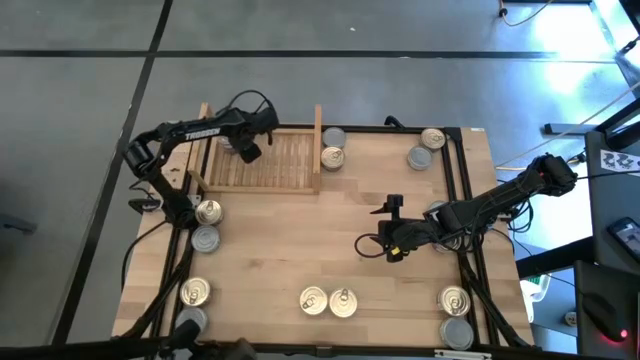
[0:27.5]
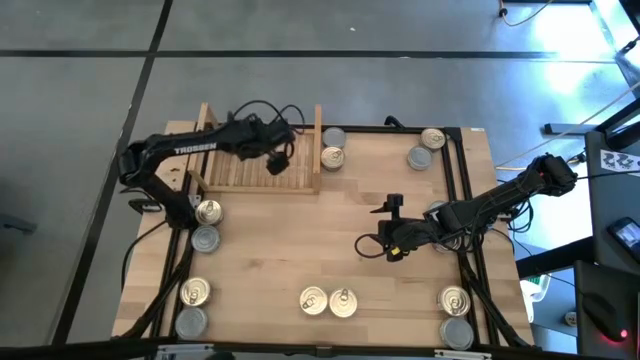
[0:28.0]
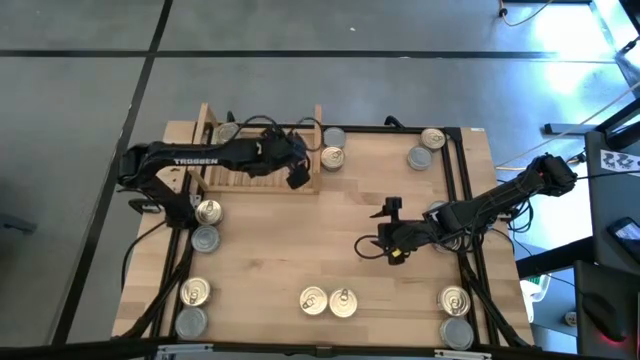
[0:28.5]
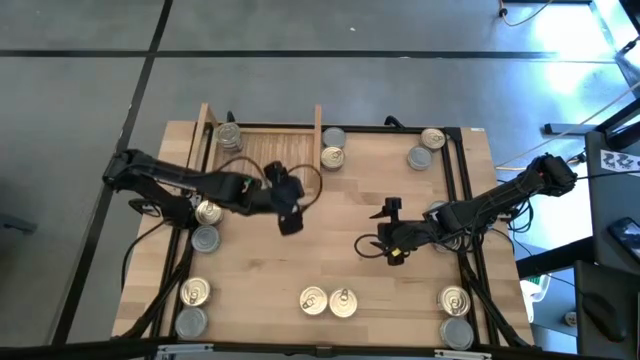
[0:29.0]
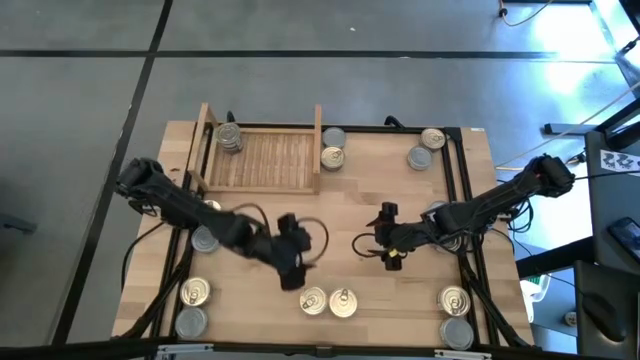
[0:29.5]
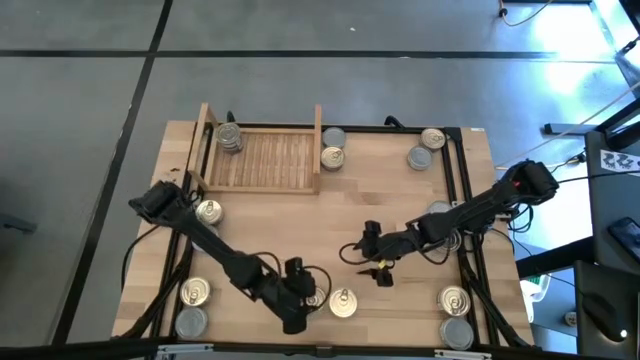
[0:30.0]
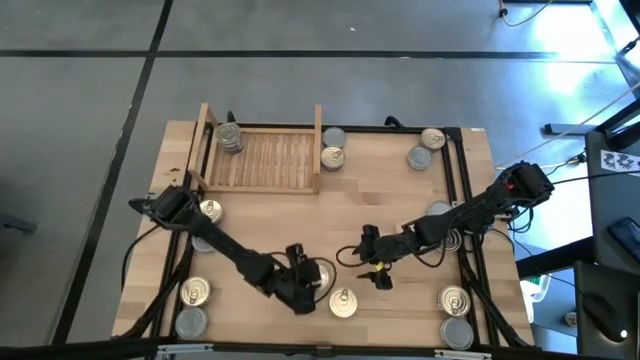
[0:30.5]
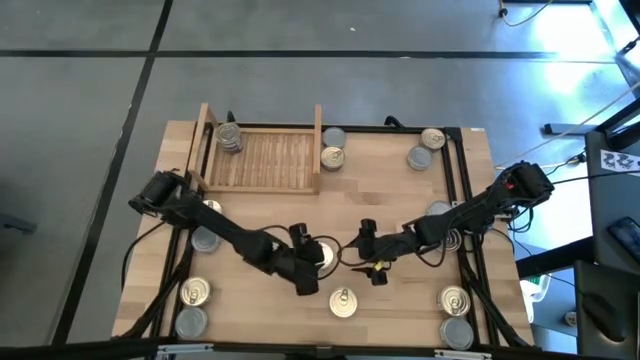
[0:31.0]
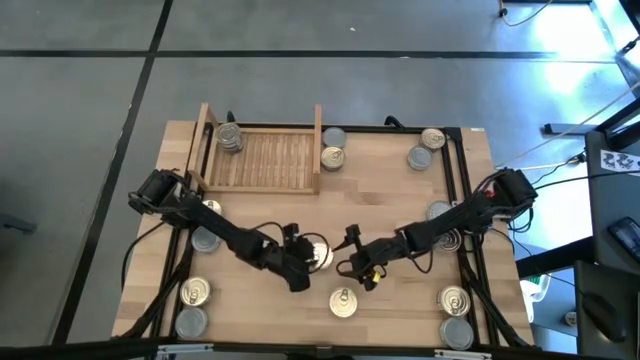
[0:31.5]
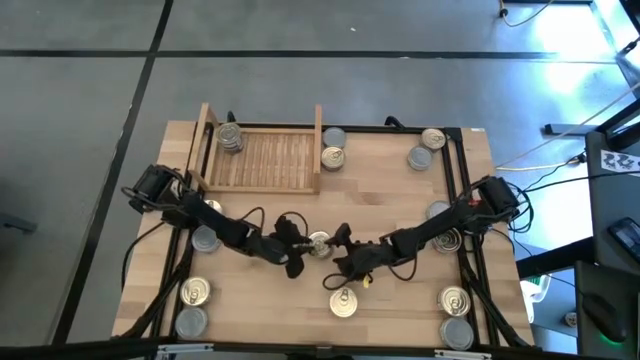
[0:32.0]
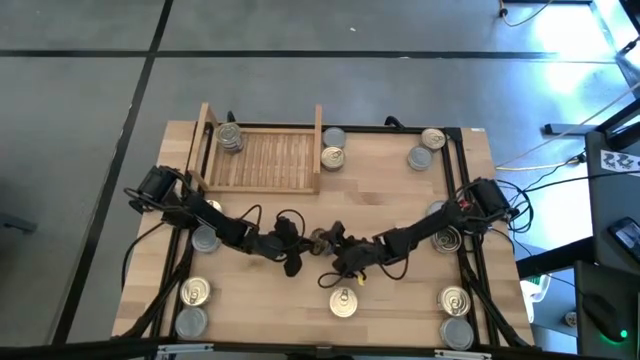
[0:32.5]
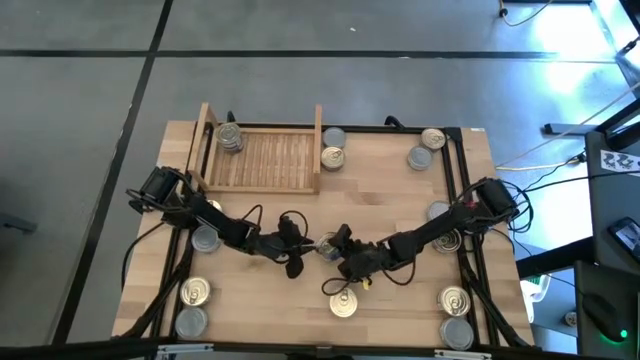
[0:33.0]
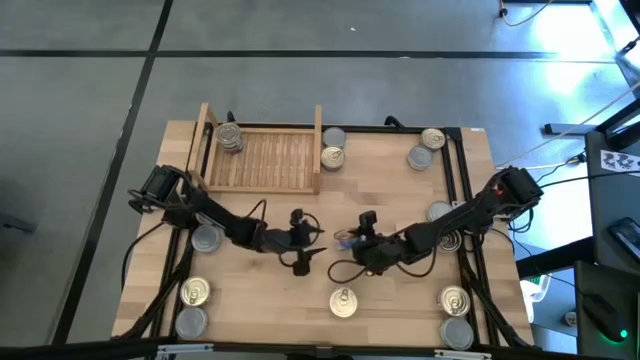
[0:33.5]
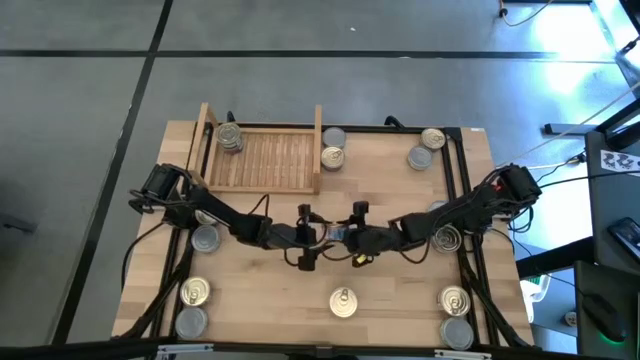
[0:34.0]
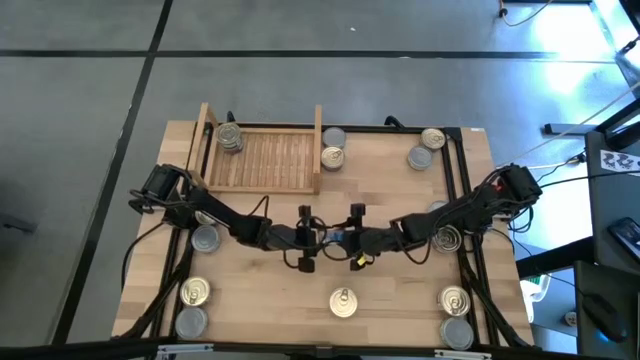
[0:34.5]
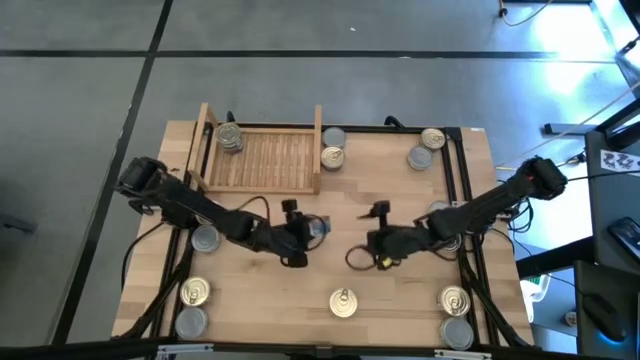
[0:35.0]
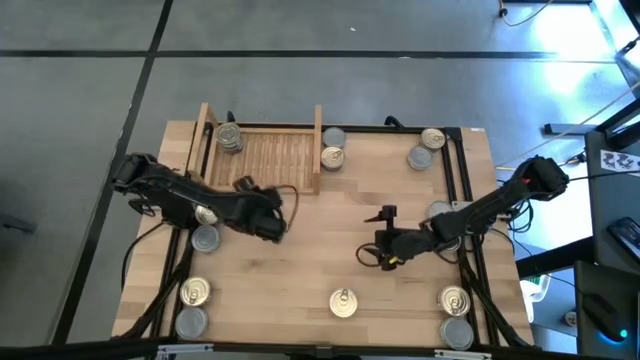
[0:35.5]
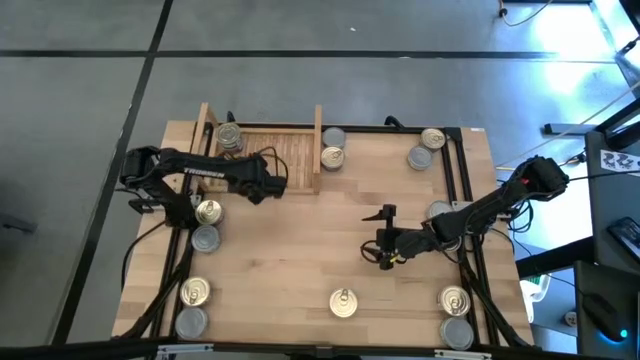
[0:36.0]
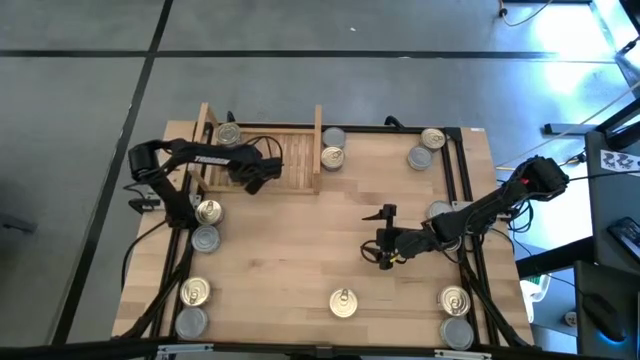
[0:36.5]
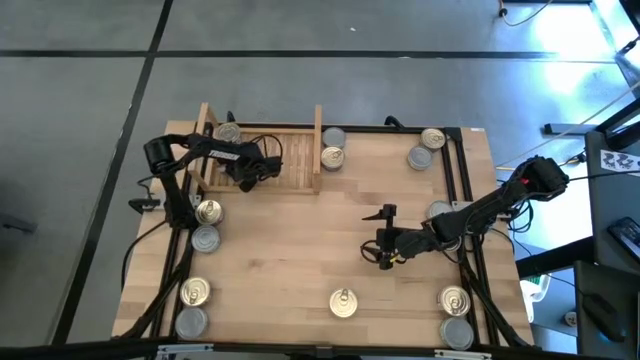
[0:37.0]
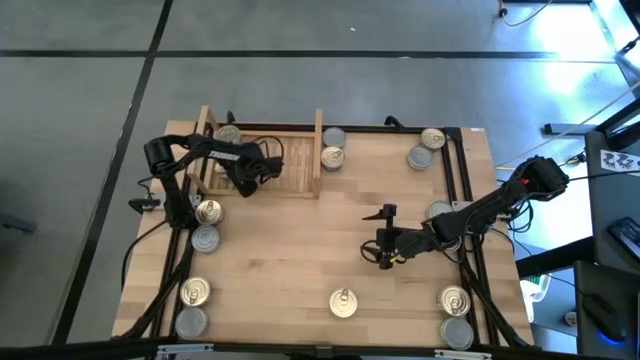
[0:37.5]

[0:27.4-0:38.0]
Task: Stack canned seafood by type on shelf
Put the blue tuna can on the shelf

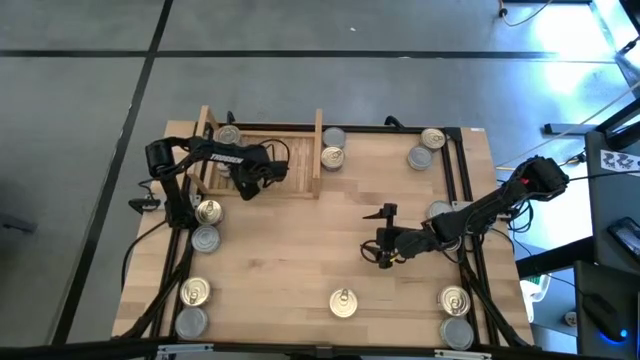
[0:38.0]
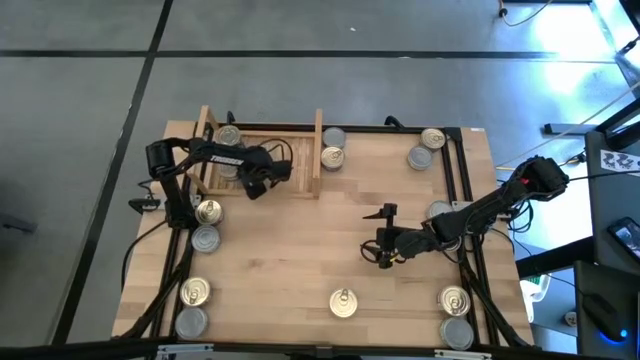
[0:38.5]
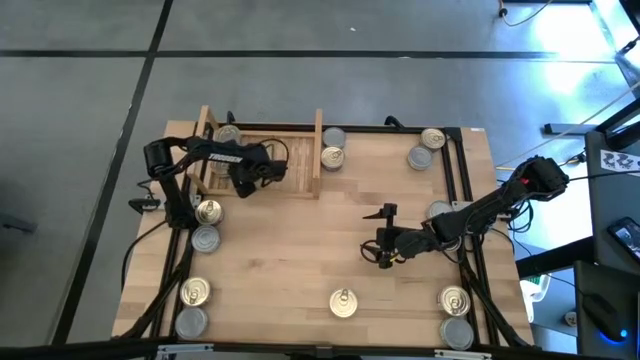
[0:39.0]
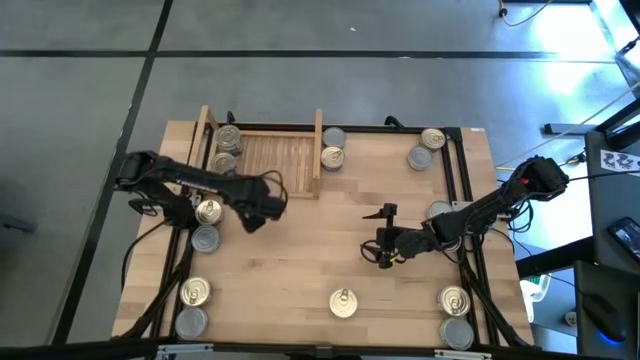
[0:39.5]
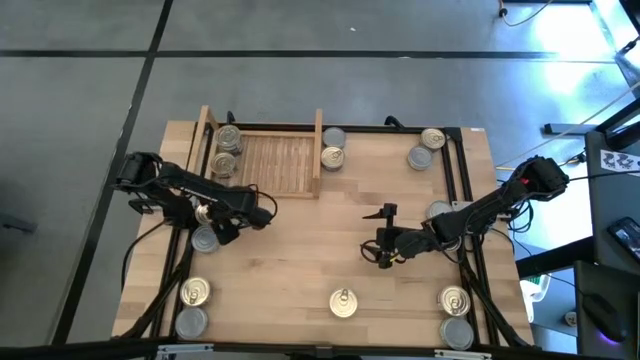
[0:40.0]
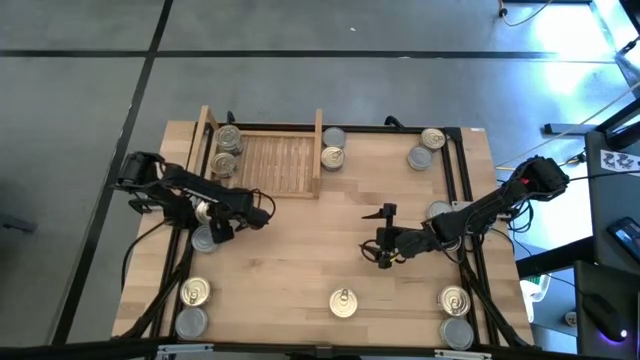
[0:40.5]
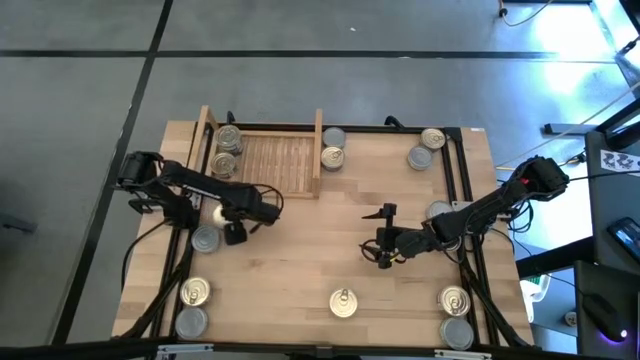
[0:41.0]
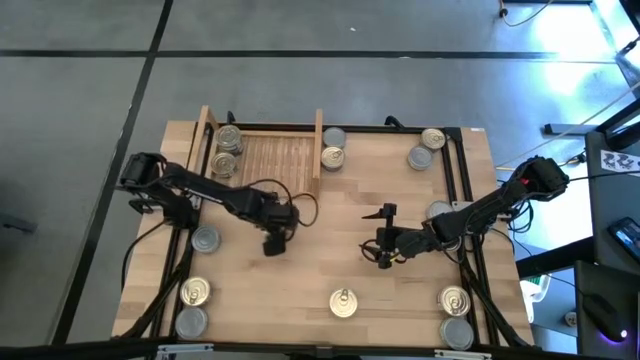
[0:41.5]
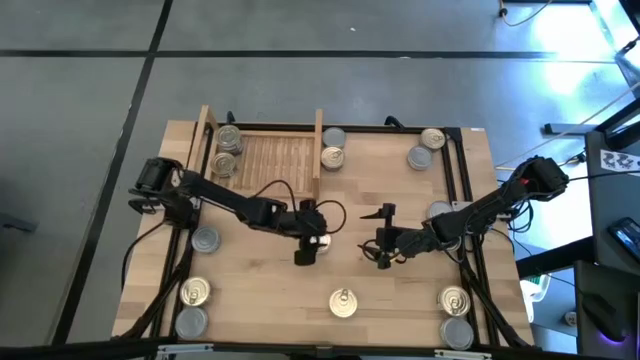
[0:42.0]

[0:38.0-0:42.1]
Move the blue tuna can from the middle left to the center

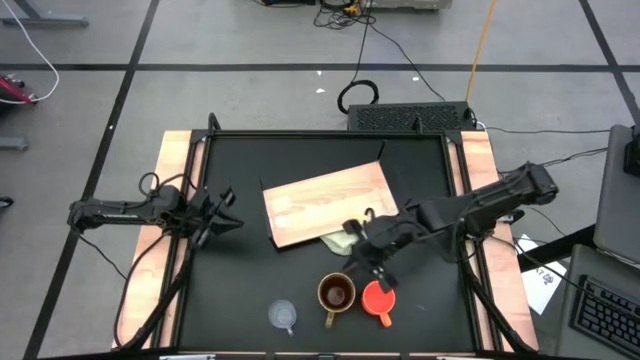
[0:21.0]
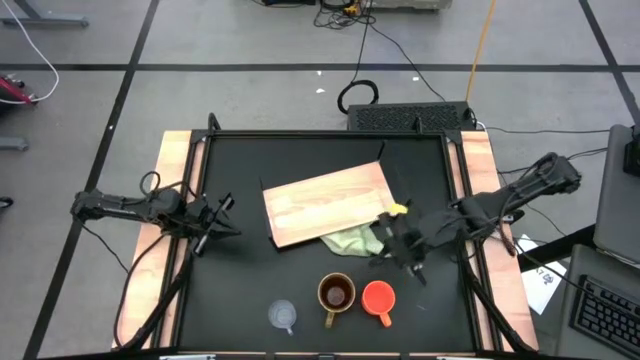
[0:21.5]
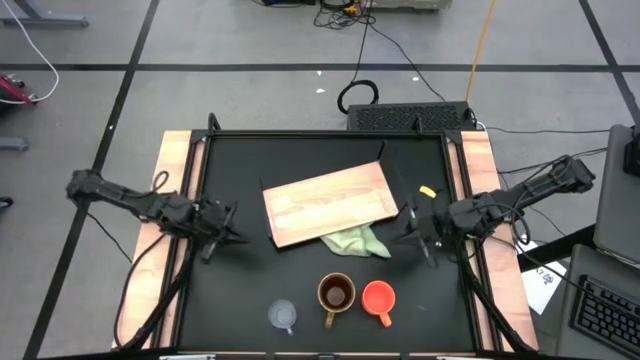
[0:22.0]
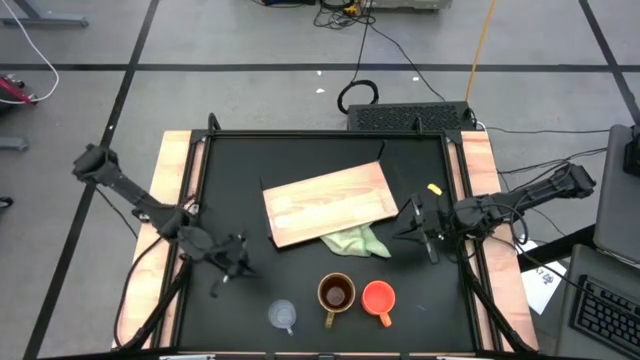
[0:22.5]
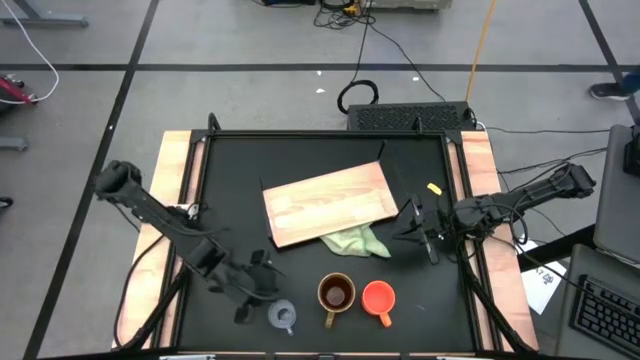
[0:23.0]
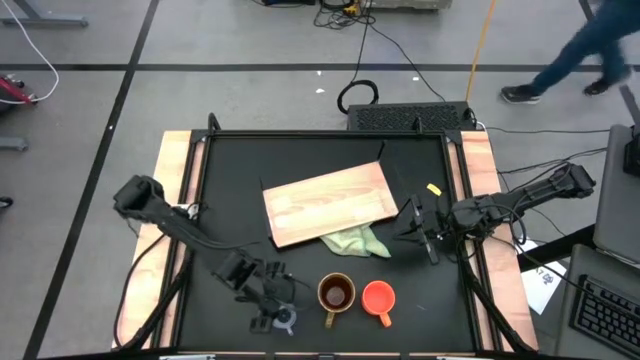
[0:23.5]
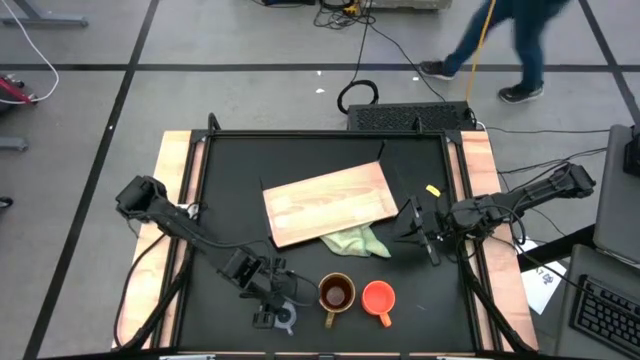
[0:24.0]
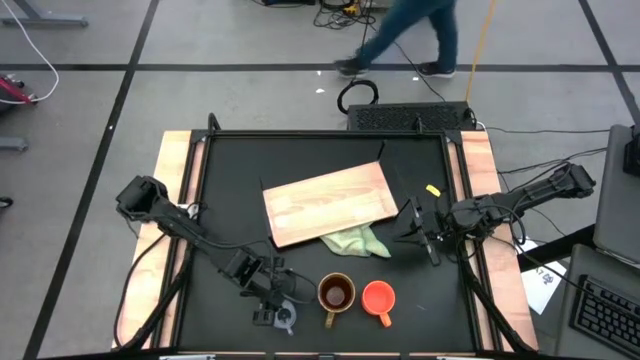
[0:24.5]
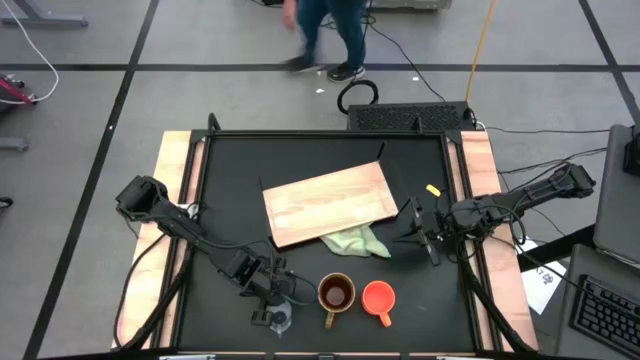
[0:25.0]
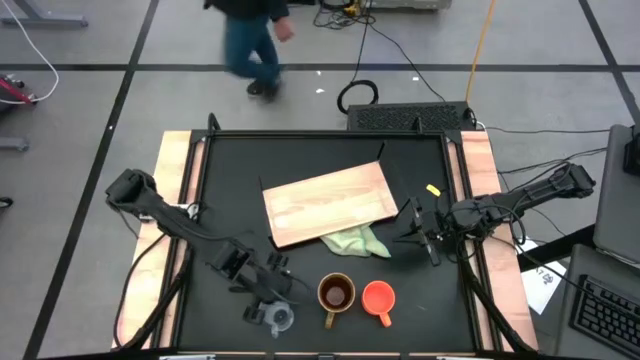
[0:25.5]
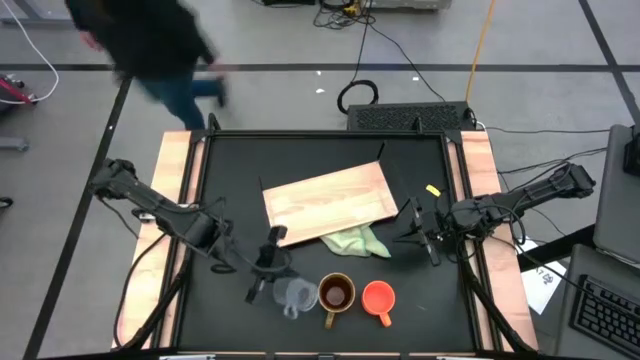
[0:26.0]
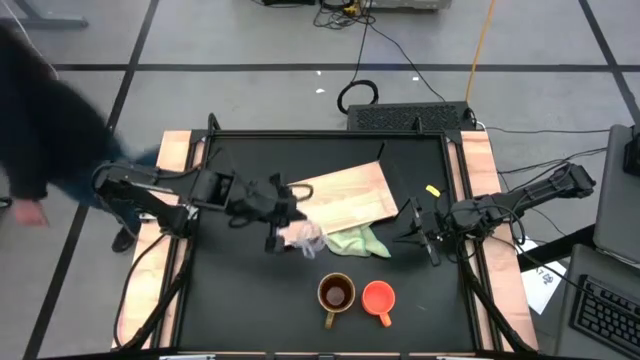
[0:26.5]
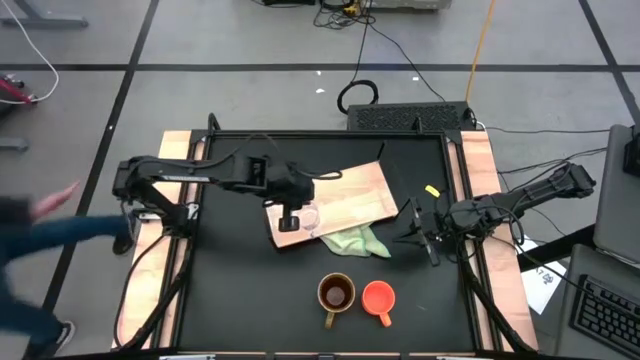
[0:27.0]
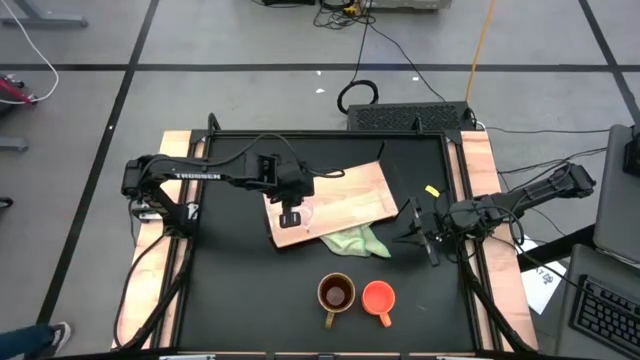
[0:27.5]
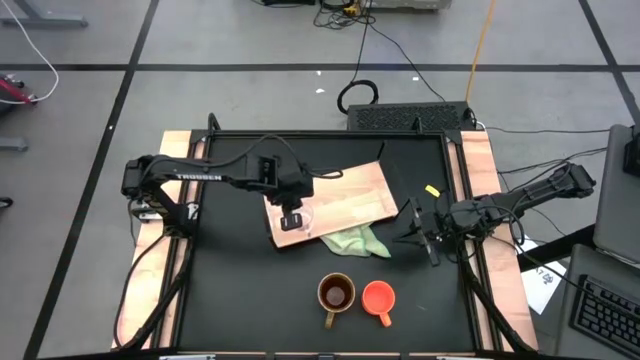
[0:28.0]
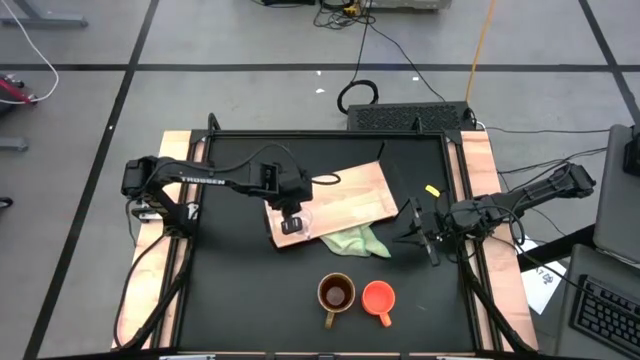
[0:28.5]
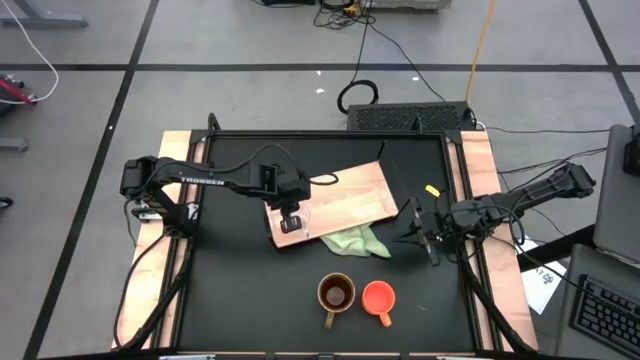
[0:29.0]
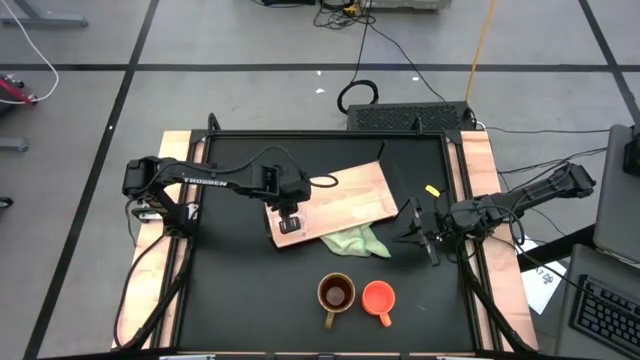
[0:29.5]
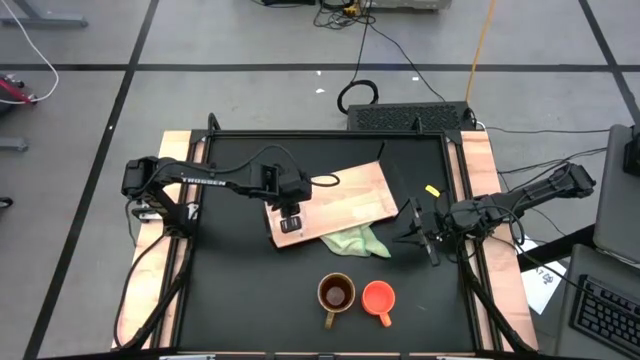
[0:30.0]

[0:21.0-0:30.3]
Task: Stack small to large cups/mugs on shelf
Put the transparent mug on the shelf
